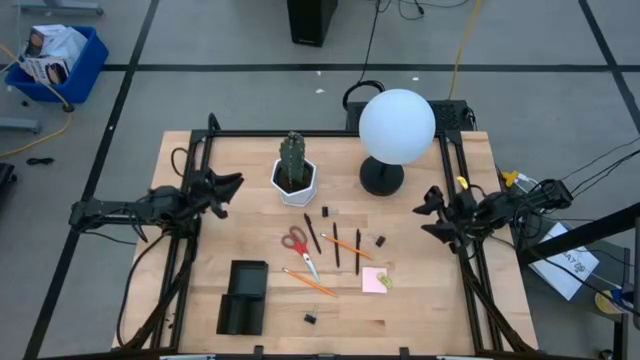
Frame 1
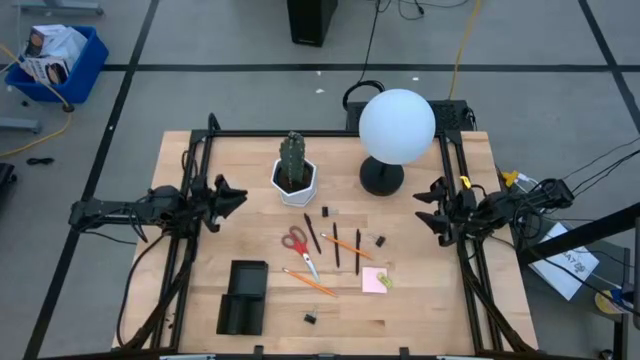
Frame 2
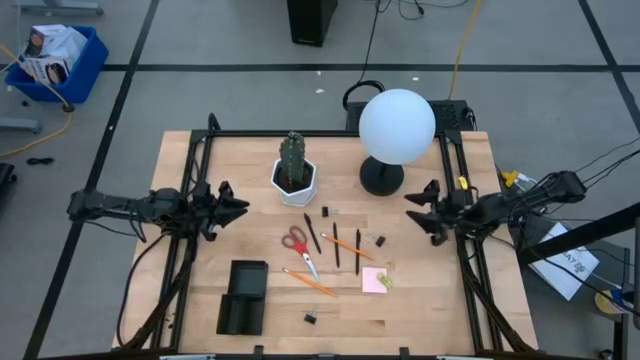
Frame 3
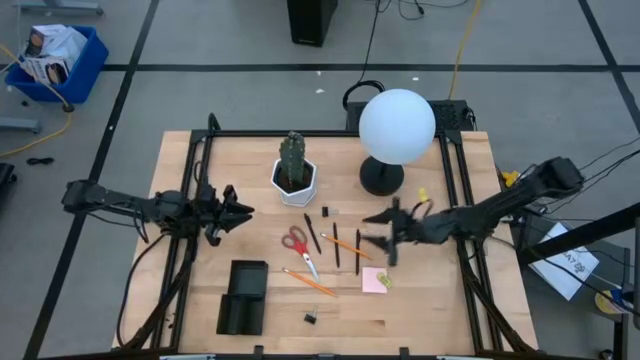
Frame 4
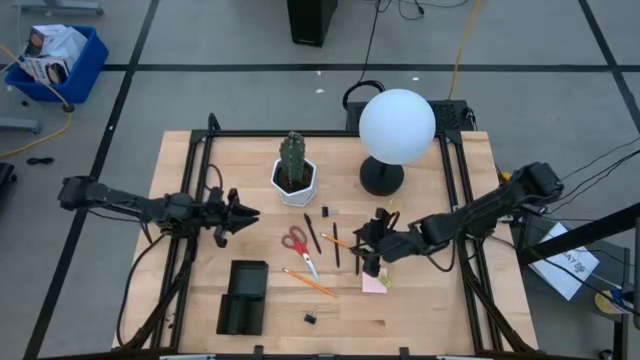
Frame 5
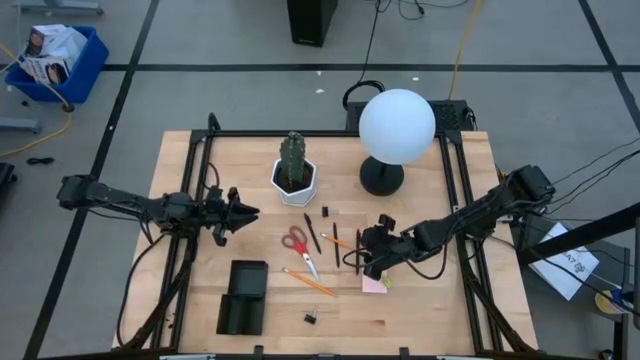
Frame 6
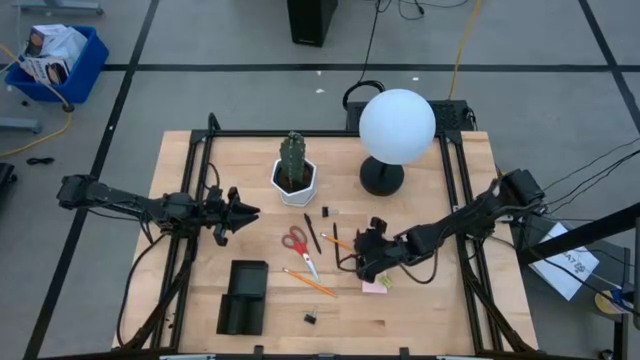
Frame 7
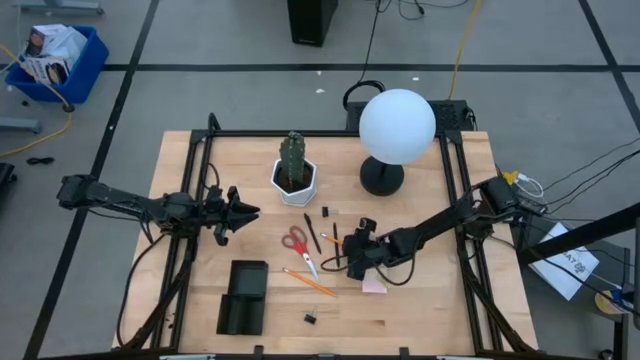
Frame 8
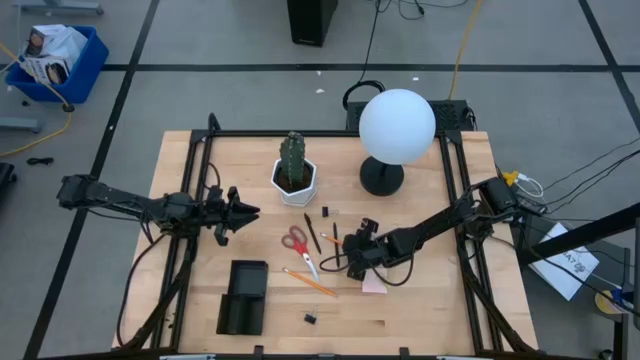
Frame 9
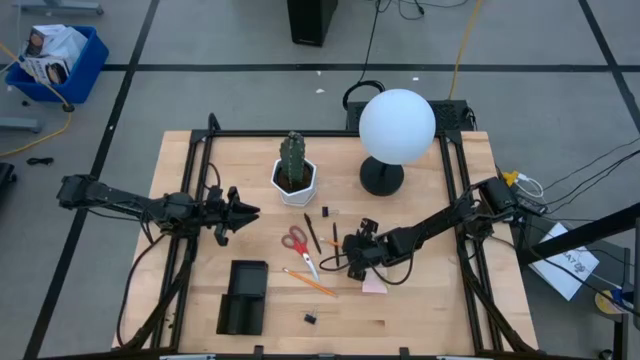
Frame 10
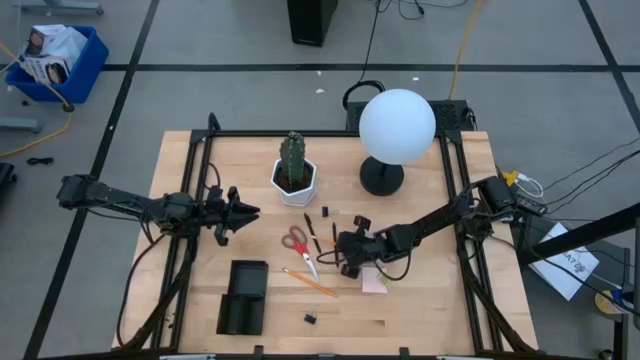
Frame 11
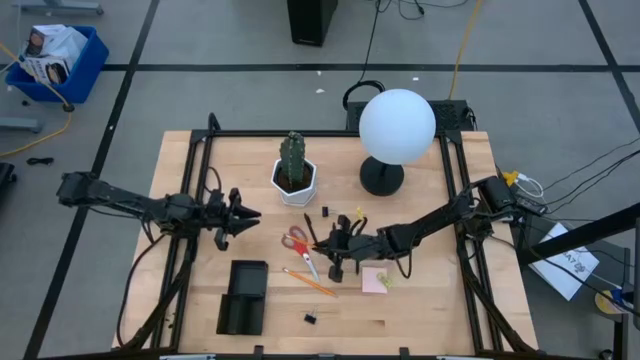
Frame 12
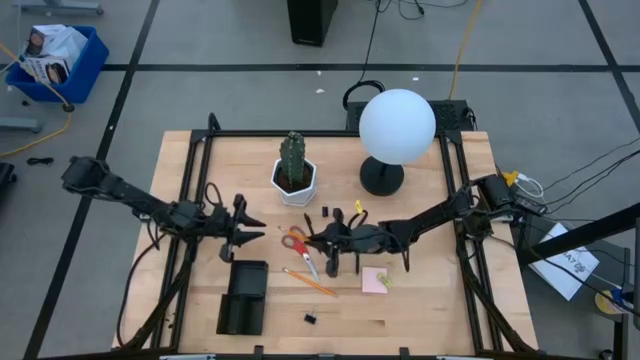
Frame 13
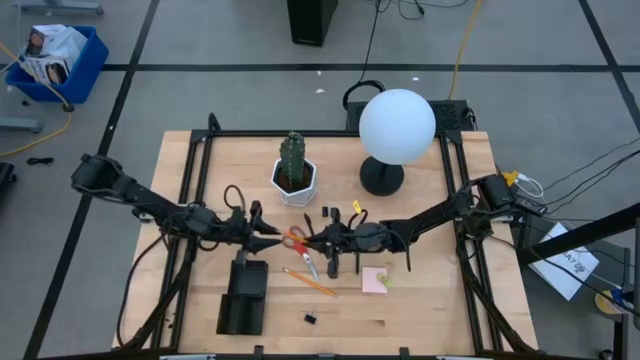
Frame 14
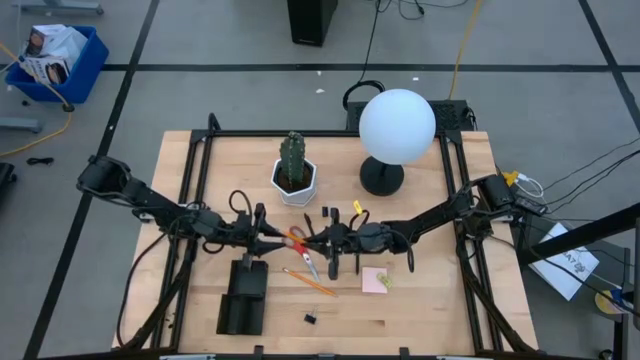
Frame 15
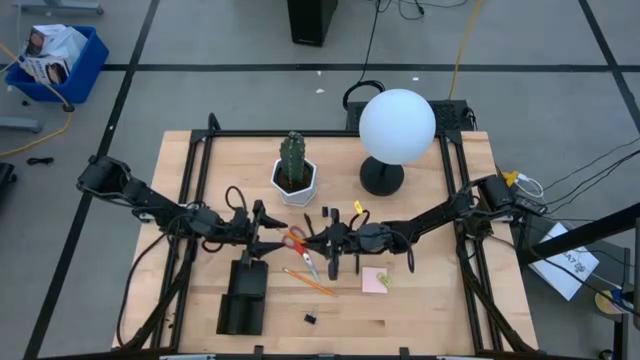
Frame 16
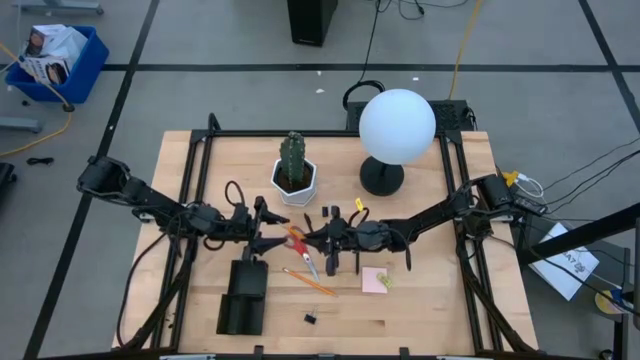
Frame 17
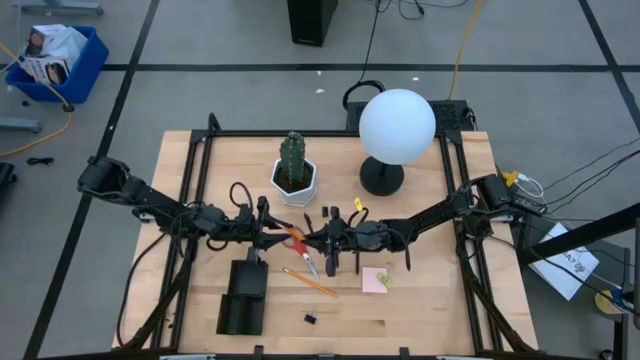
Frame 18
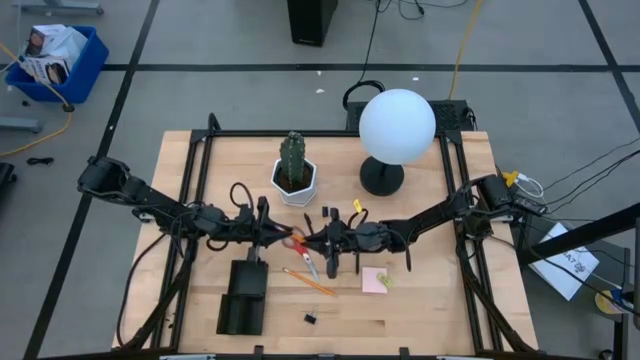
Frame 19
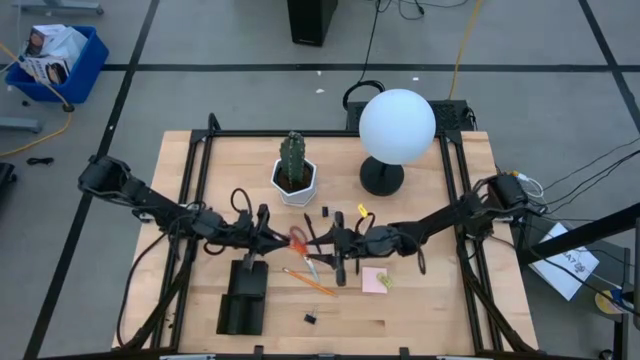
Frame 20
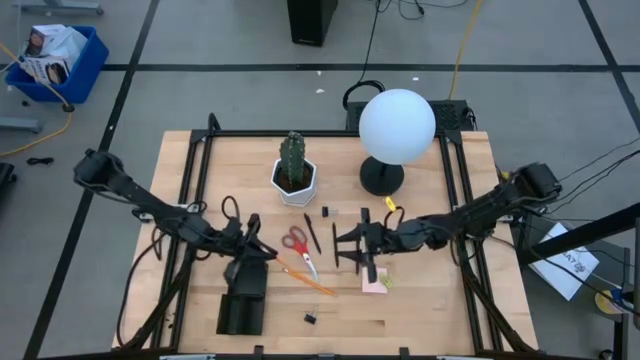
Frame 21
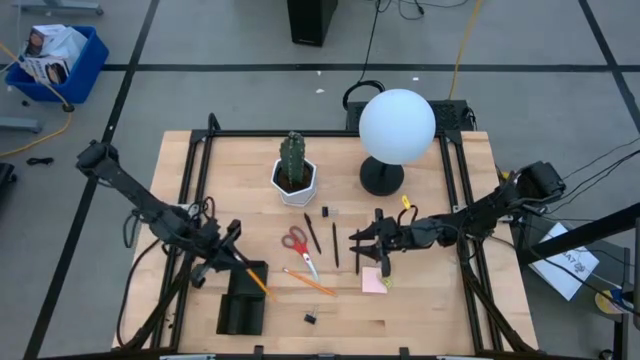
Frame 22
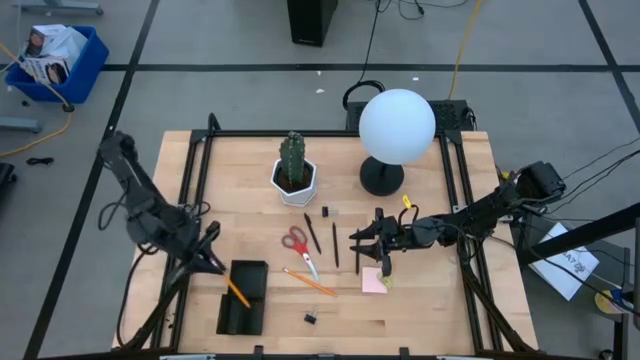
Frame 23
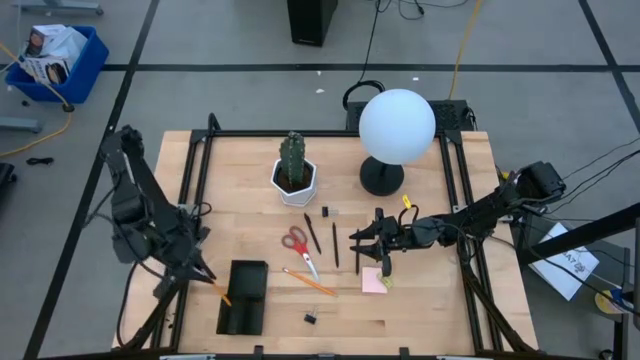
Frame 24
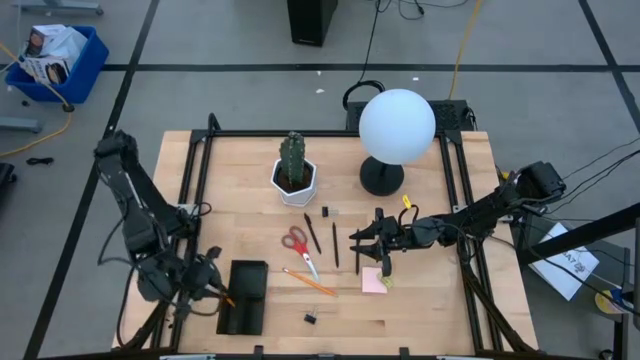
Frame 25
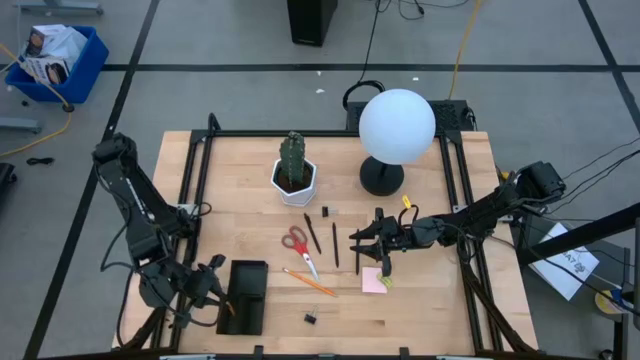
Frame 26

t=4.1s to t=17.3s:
Task: Pick and place office supplies into organizer
Put the top pencil in the desk organizer

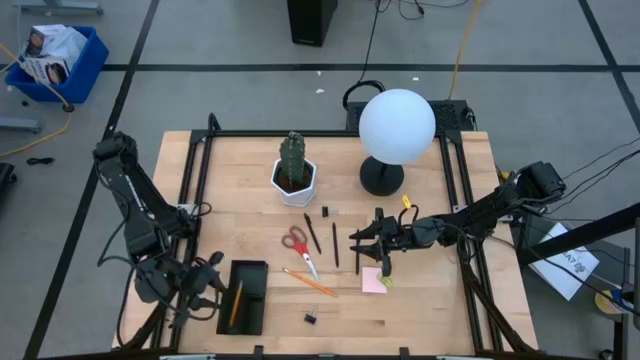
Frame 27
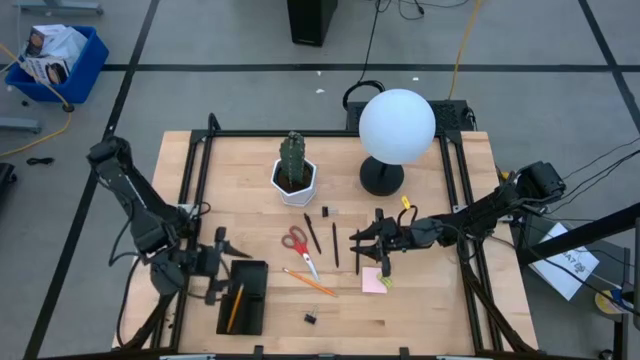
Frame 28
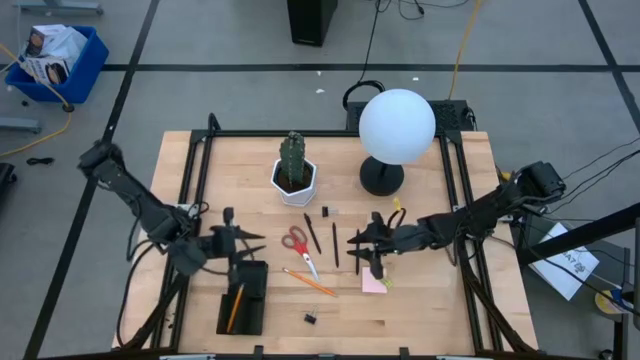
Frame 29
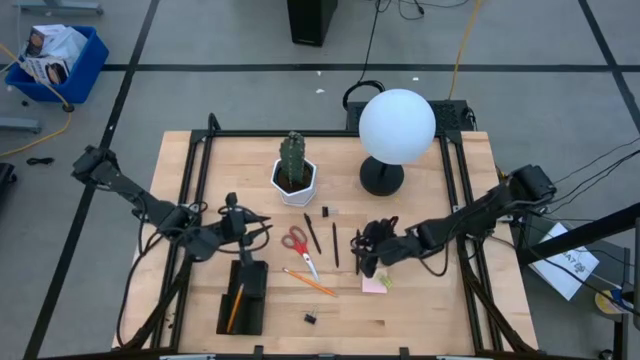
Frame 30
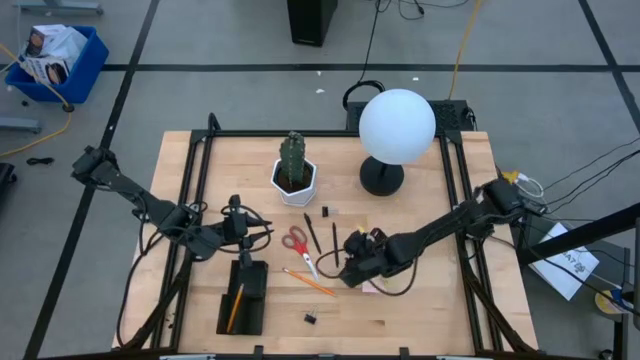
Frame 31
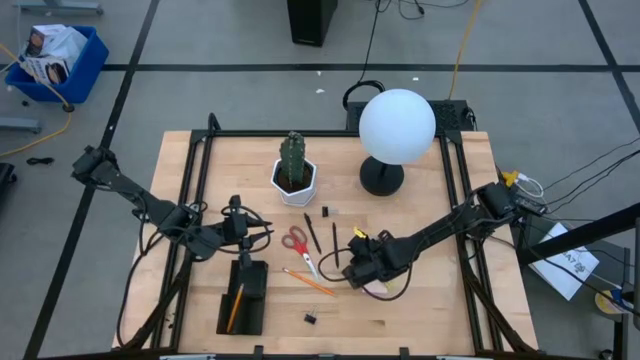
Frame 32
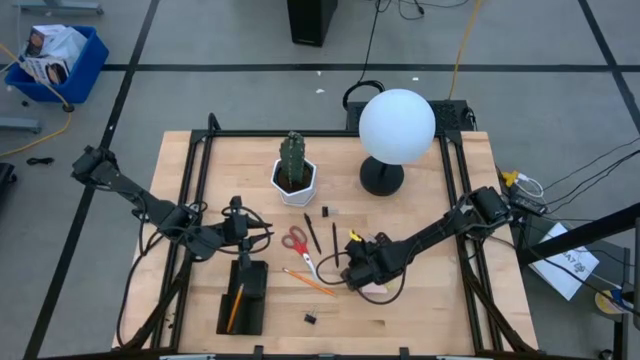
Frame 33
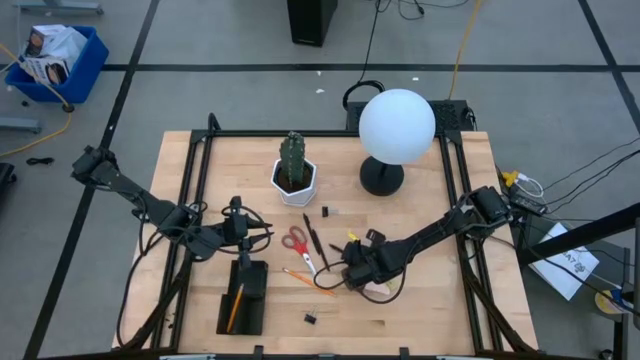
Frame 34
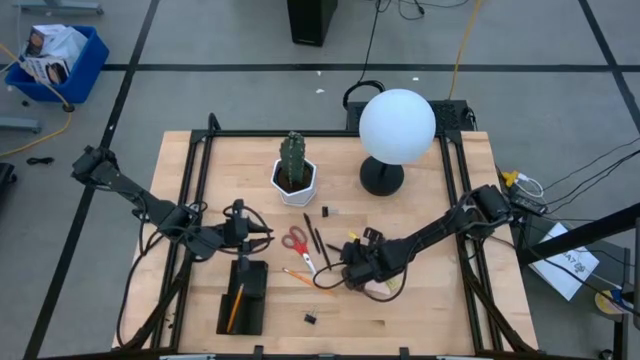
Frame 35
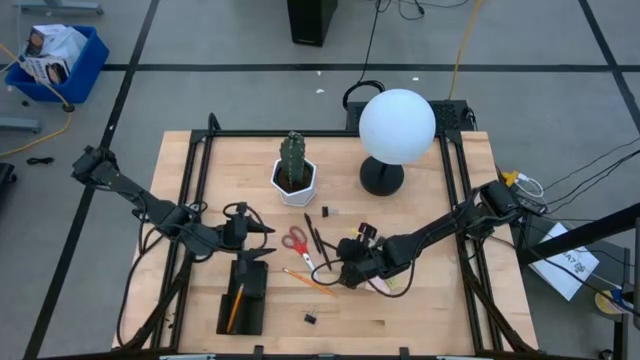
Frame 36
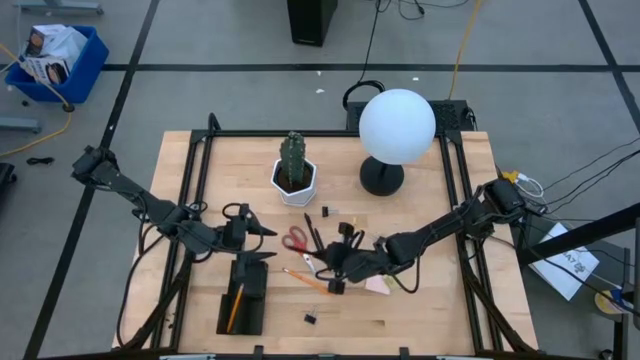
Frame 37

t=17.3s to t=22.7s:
Put the right pen in the desk organizer

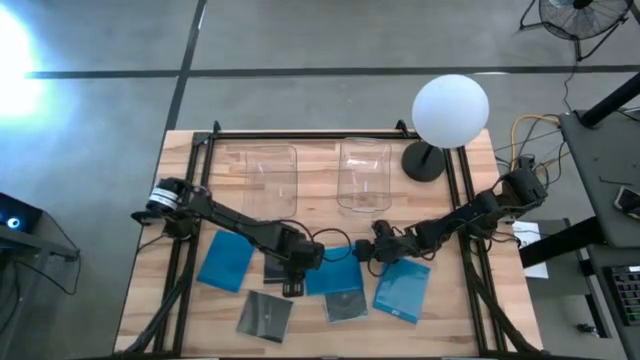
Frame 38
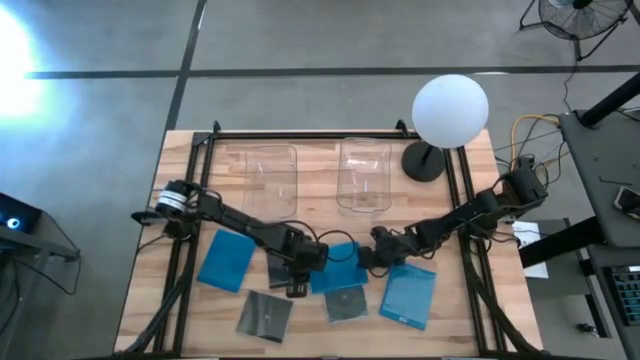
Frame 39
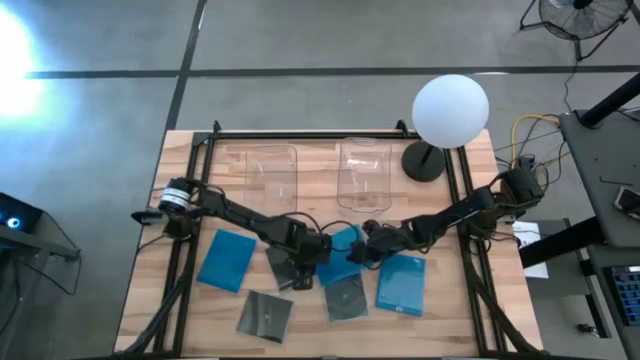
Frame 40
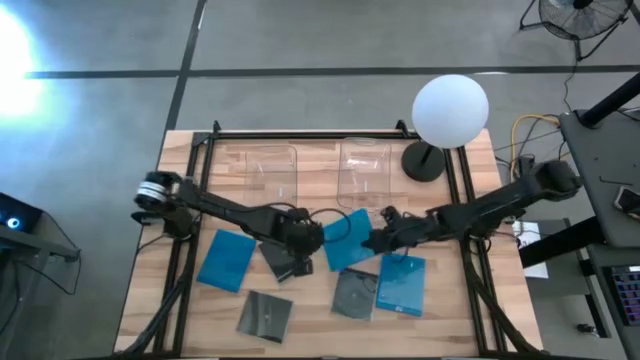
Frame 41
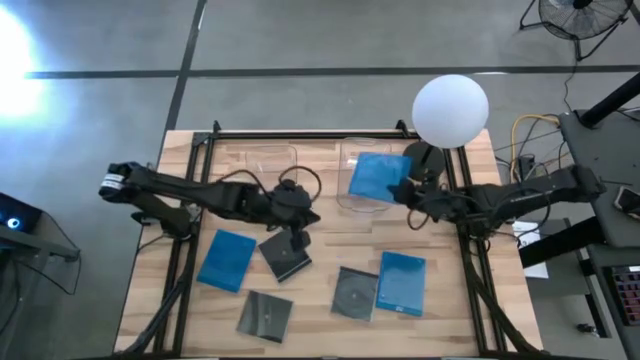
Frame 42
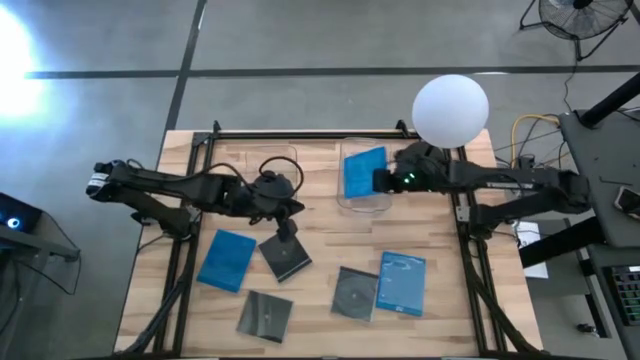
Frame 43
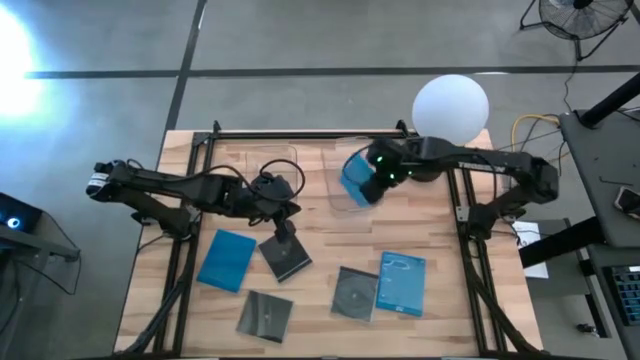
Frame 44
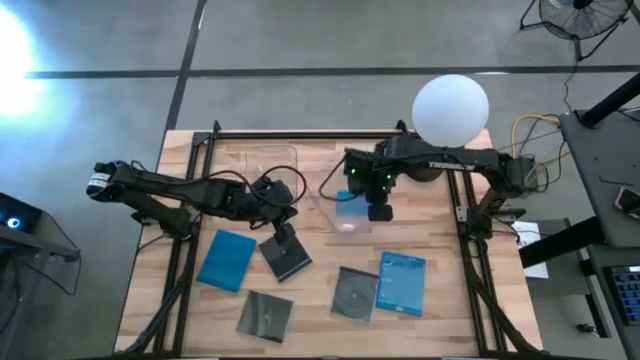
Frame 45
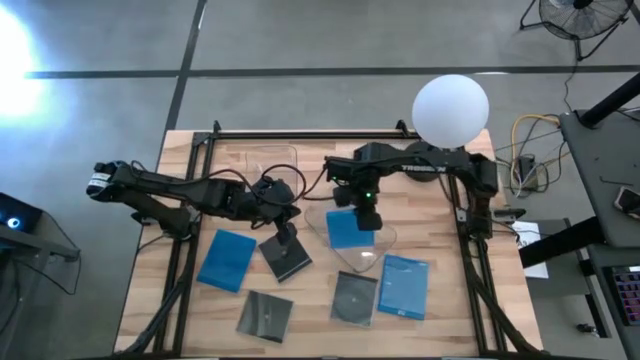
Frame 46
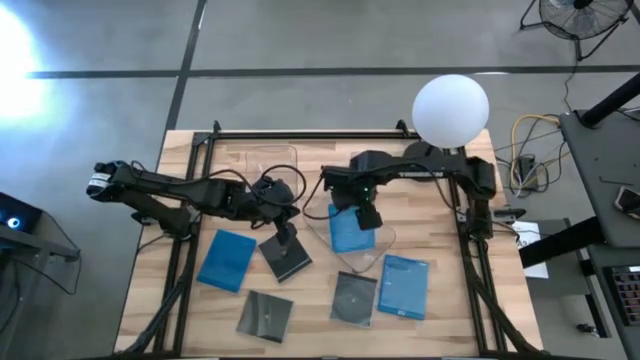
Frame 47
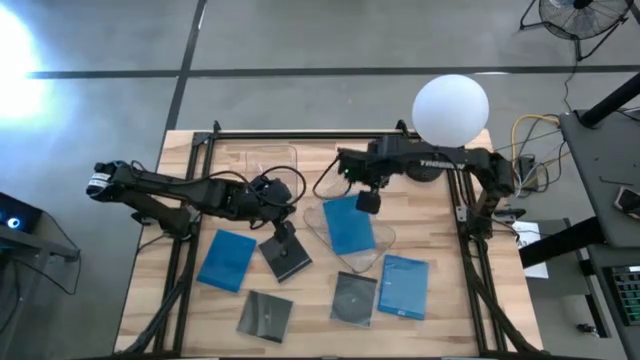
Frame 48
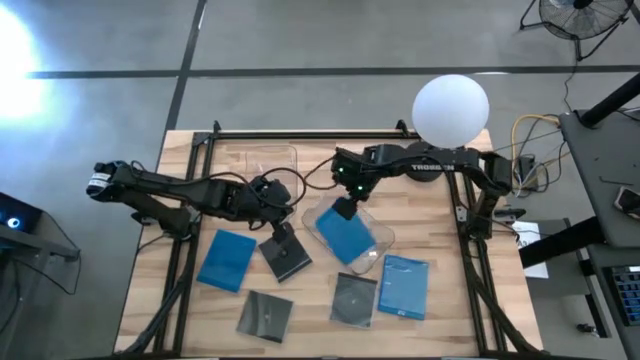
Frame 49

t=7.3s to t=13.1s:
Task: Pick & place jewel cases by type
Put the middle blue CD case into the right transparent bin
